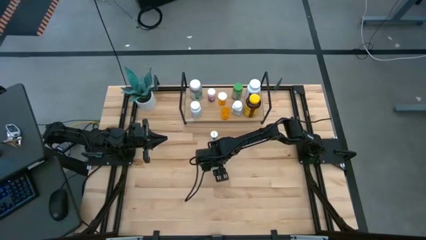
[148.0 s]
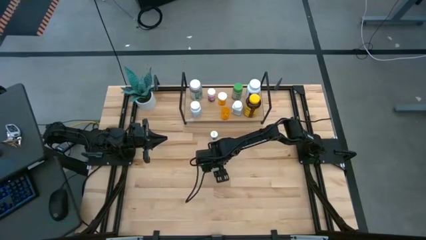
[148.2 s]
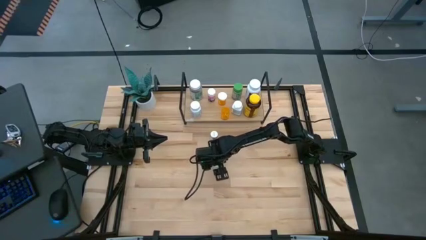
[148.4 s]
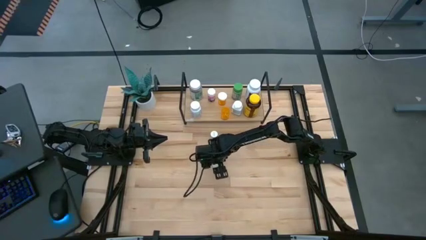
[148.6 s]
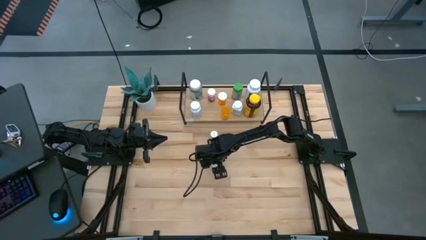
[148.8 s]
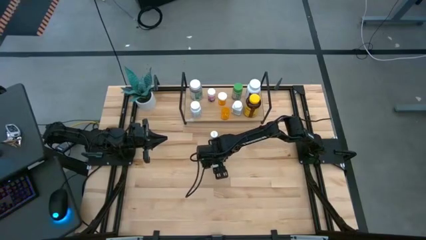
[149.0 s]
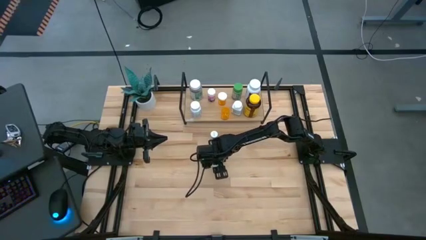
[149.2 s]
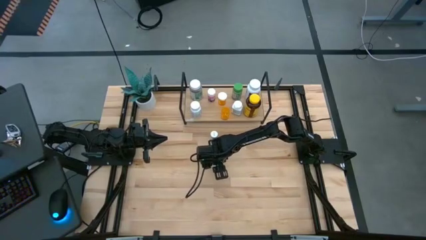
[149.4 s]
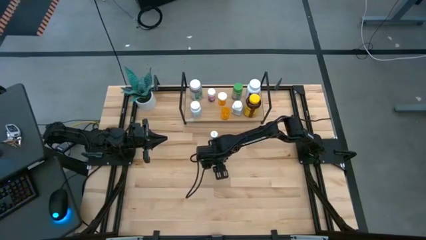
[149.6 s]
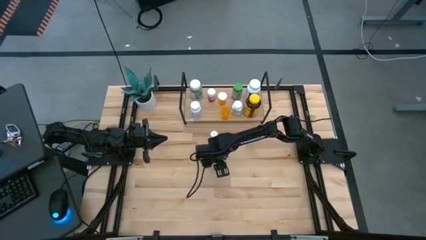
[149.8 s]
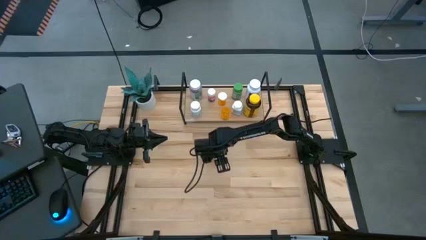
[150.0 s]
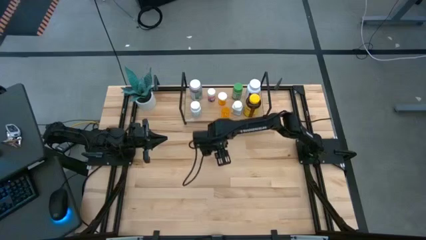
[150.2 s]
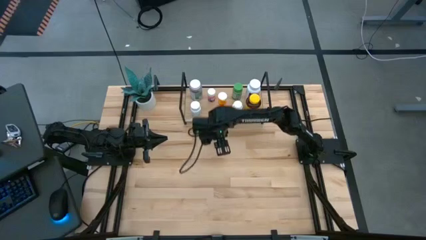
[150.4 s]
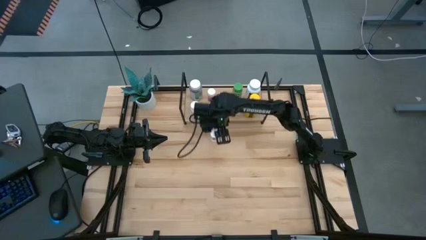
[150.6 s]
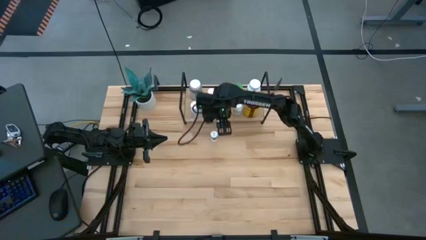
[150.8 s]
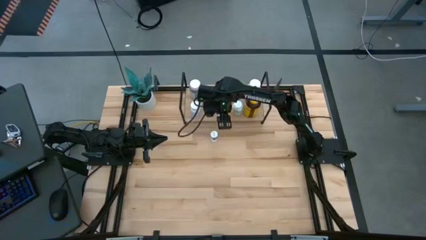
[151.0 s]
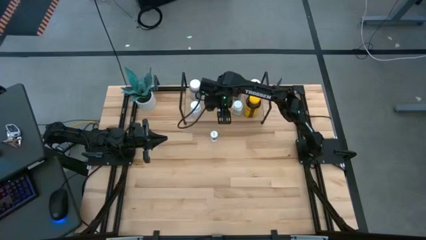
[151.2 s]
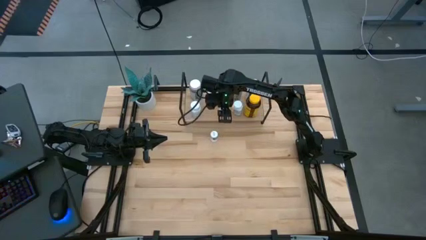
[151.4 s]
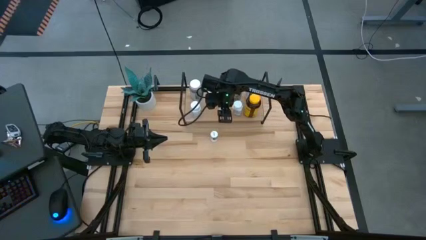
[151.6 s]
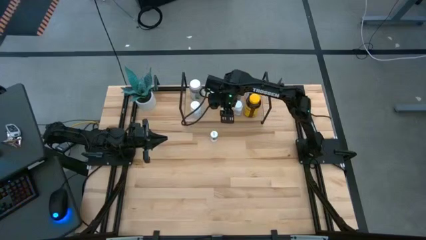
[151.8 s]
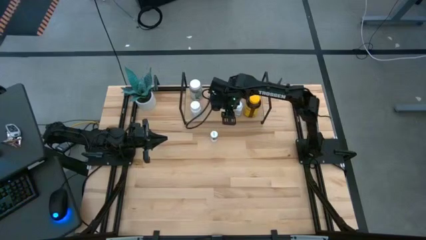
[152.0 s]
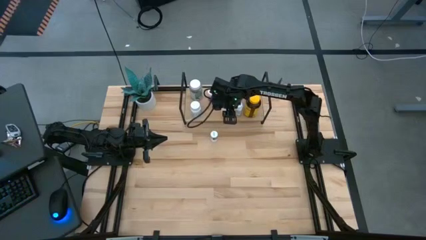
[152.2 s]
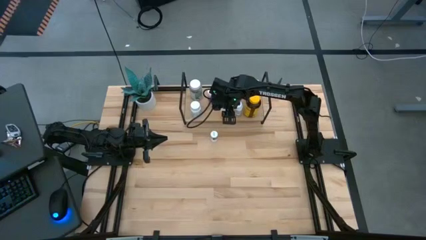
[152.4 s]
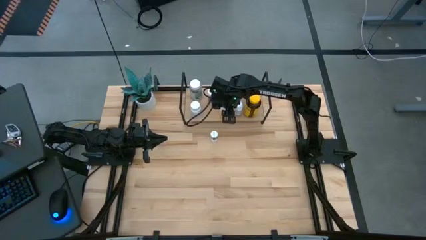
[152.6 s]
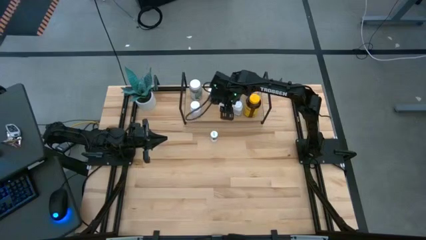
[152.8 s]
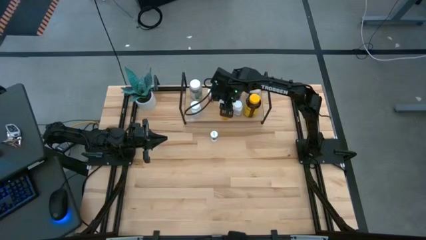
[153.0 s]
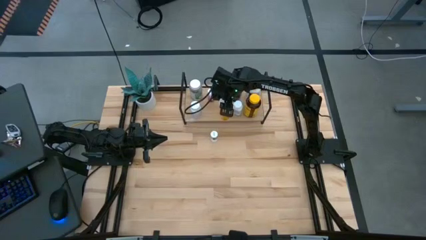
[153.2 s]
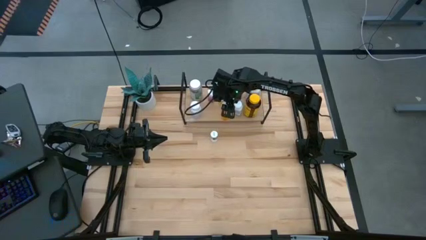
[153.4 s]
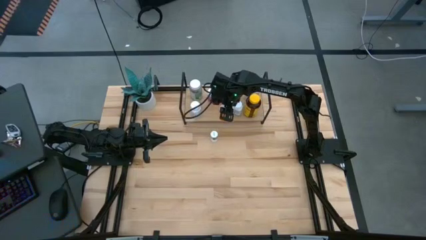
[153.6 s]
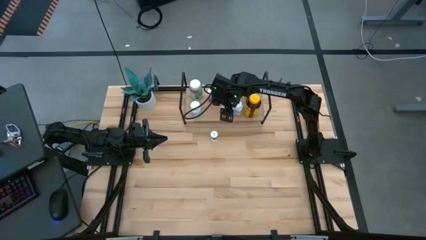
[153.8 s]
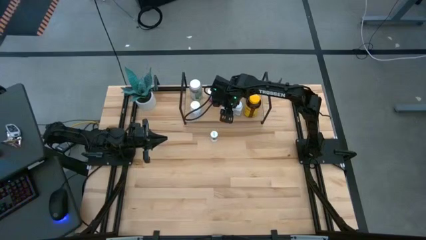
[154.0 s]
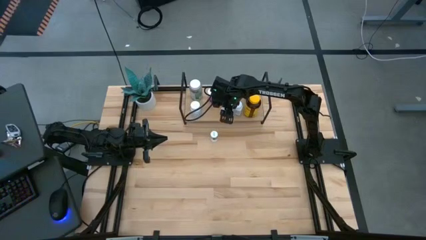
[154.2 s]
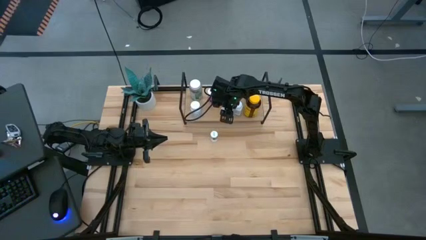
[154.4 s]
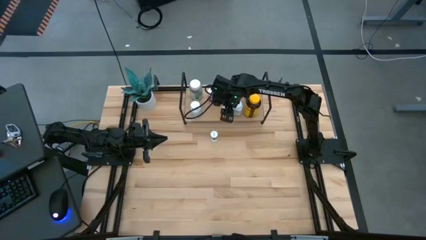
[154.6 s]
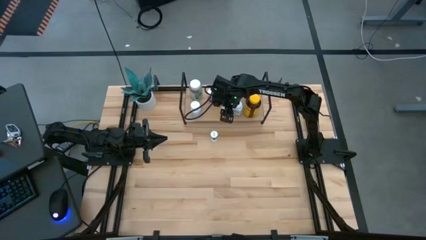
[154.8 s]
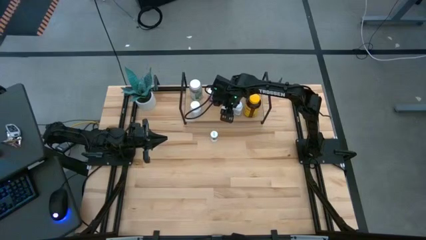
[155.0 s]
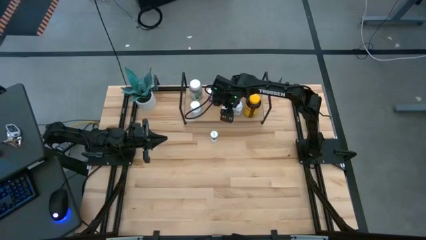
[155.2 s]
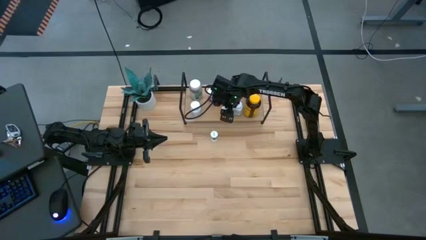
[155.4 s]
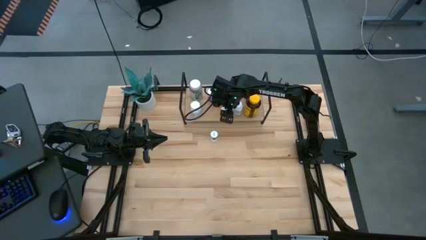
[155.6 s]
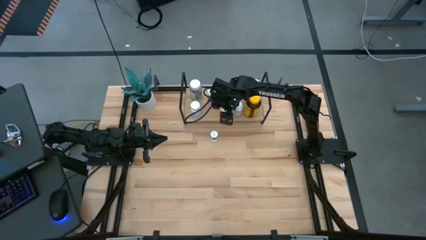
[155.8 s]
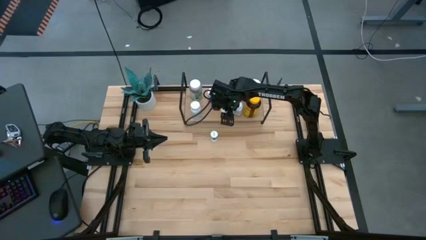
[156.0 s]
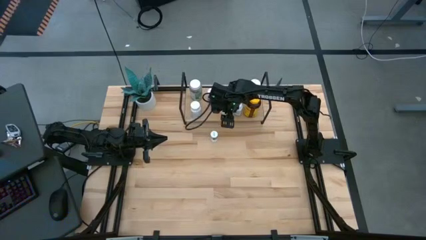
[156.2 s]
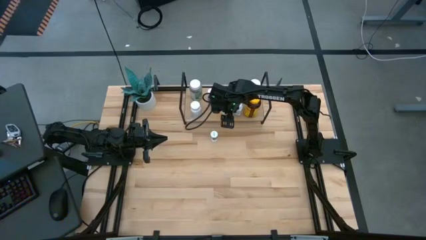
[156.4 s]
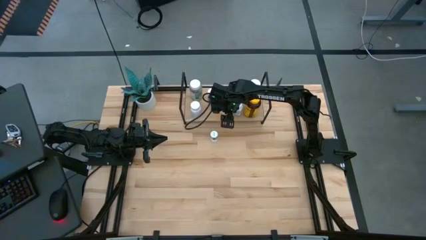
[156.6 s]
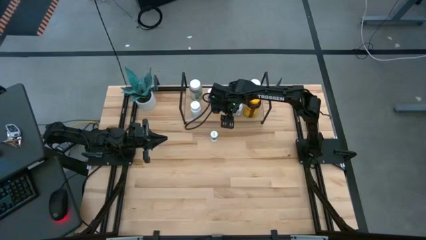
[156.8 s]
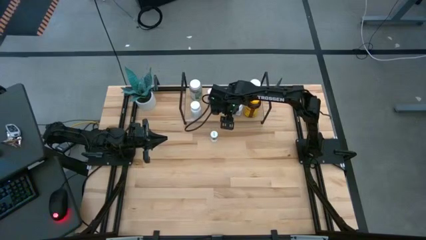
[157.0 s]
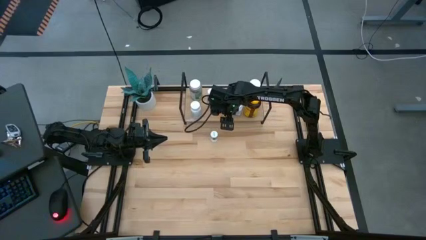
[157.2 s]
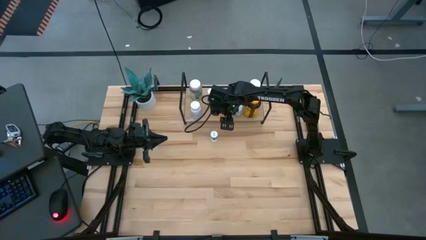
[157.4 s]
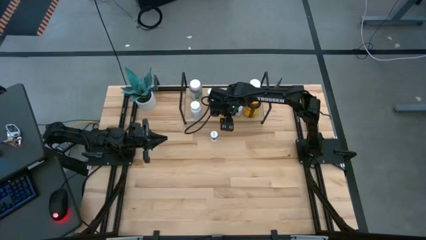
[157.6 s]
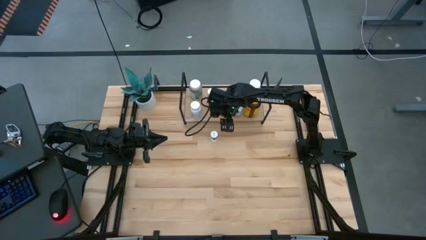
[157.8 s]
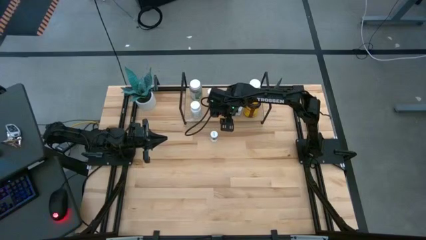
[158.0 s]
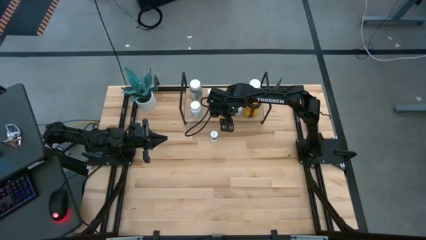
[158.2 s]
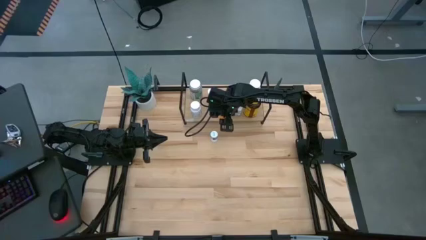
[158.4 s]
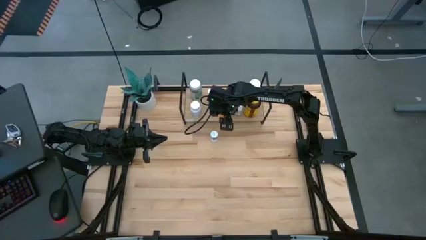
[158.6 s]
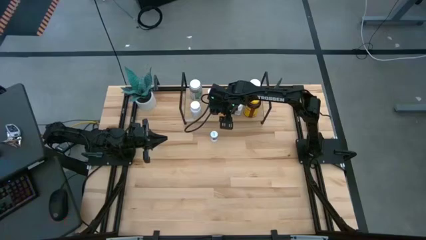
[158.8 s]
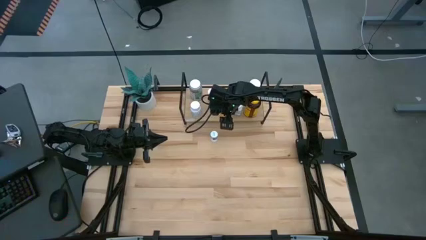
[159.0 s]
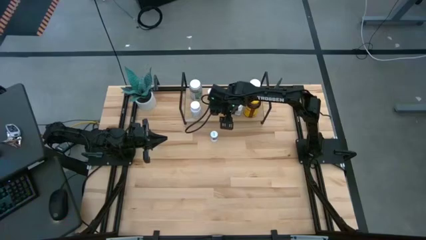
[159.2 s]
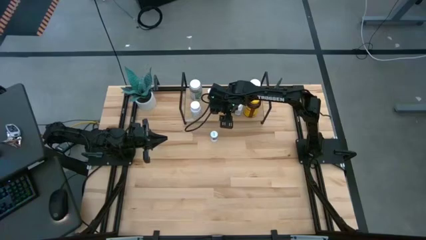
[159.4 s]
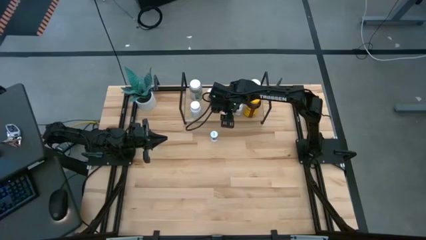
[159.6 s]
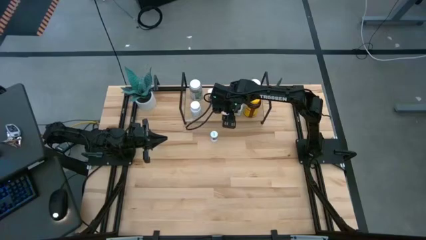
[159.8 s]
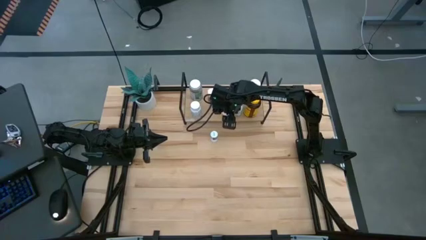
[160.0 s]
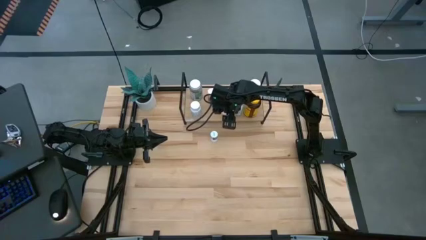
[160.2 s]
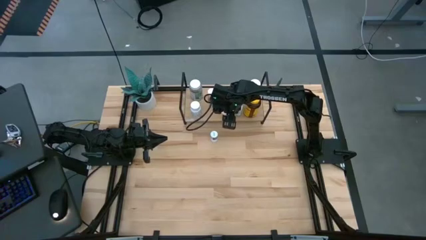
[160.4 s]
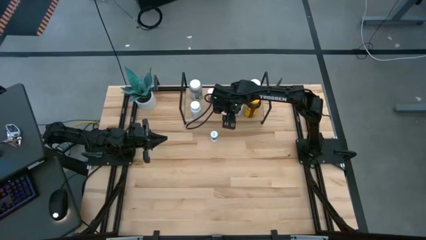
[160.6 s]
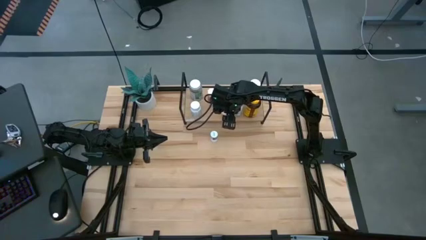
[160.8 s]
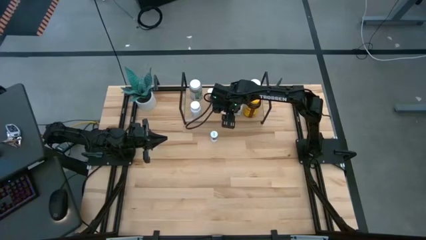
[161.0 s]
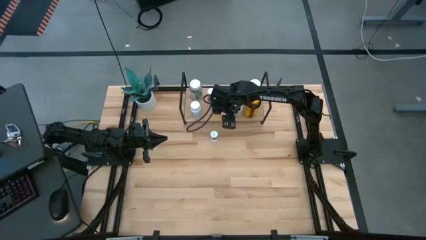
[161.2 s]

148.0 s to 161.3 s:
Task: Pick and place medicine bottles onto shelf by color
Close the yellow pill bottle

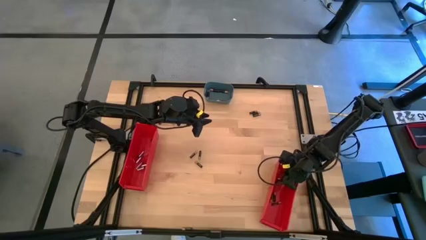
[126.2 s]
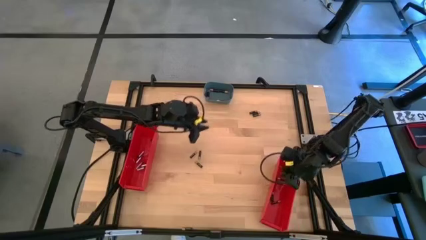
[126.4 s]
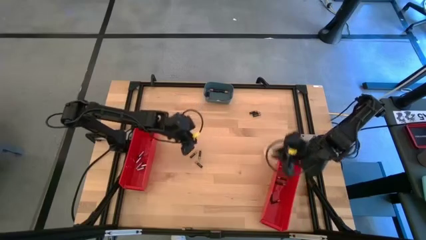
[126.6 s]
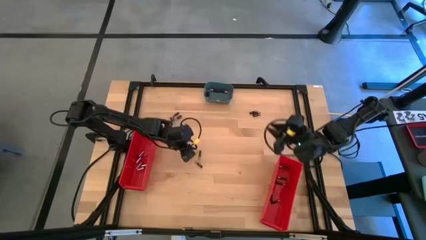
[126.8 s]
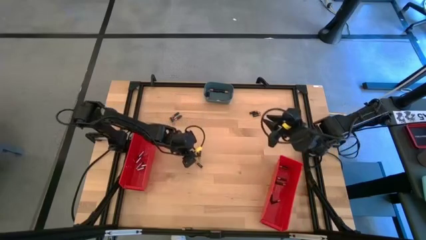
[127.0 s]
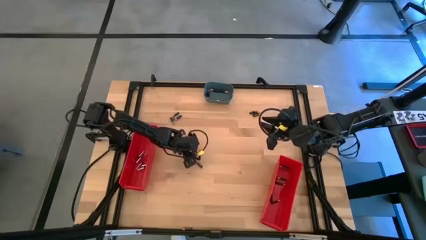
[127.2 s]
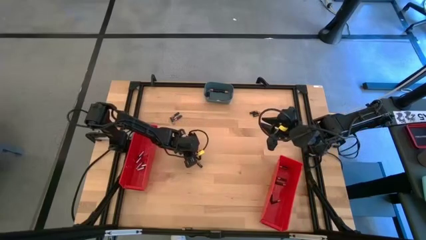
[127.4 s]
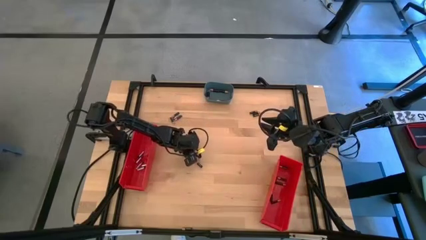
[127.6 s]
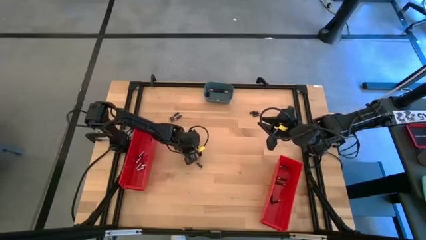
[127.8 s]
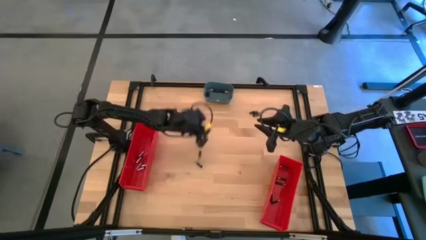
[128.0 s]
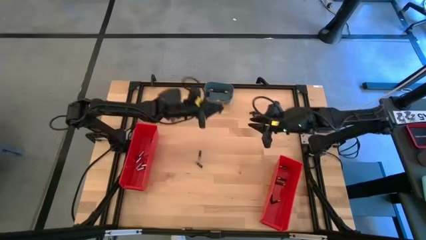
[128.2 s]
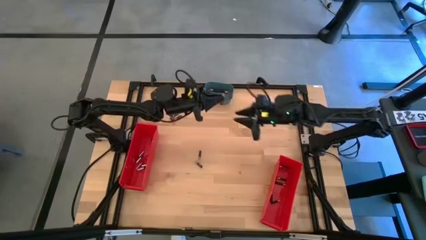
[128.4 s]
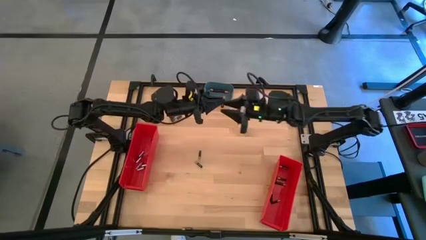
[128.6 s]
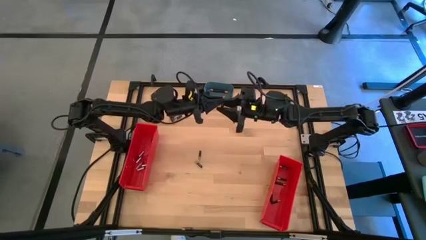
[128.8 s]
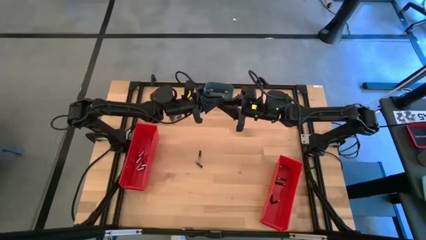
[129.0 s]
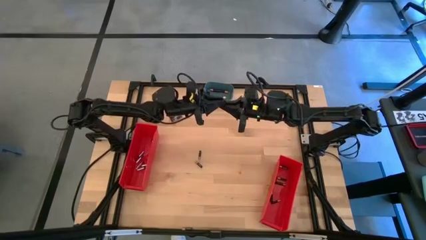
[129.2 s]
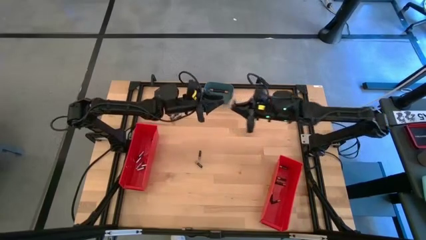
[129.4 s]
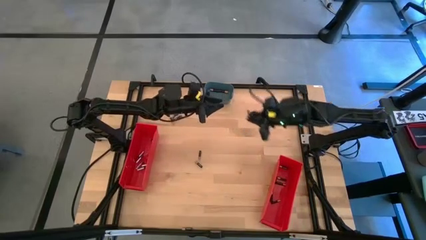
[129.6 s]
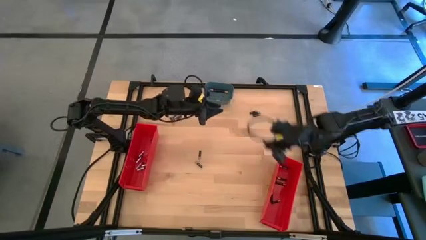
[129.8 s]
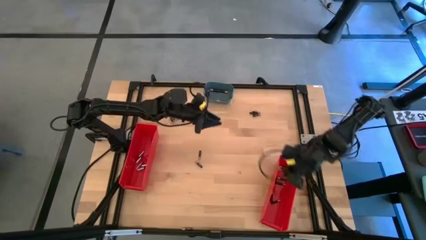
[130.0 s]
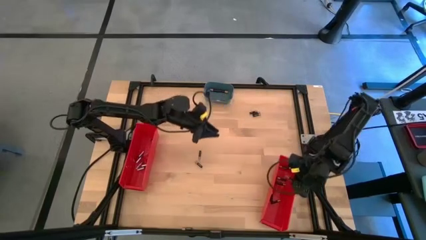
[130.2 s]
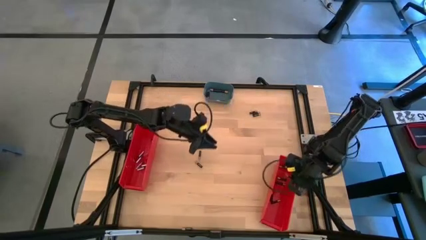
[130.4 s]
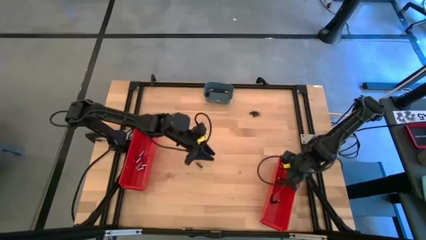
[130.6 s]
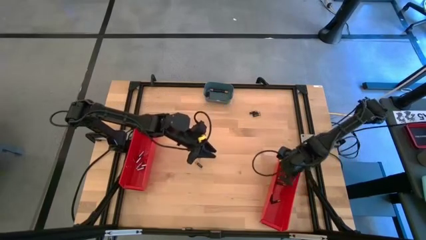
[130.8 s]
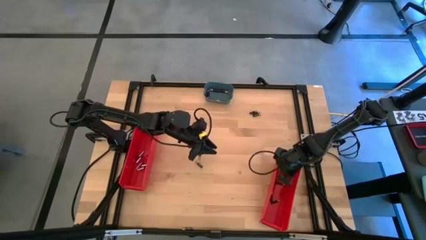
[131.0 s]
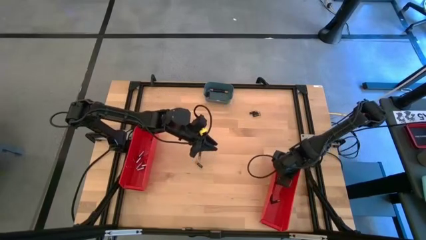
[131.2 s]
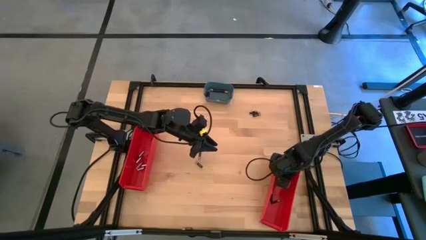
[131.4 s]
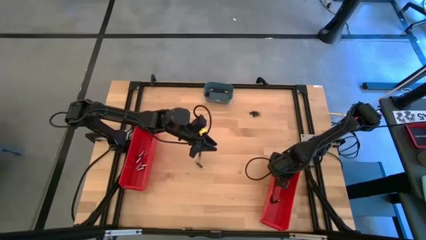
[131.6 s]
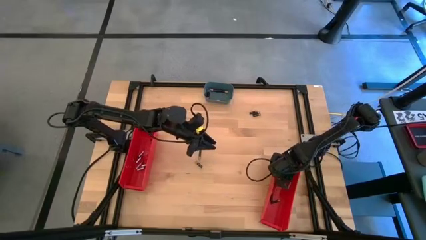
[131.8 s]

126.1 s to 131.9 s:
Task: Sort batteries
Put the small brown battery into the right red bin
